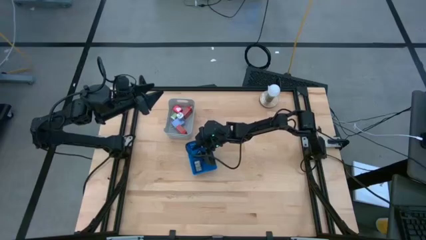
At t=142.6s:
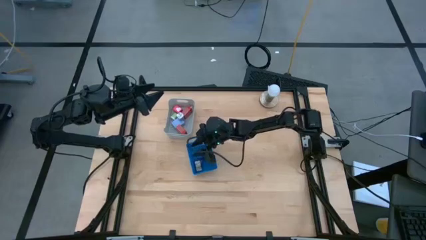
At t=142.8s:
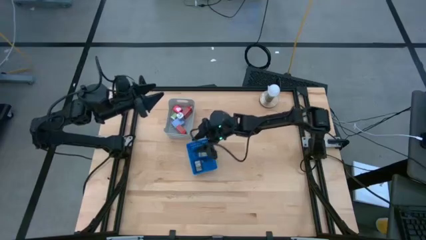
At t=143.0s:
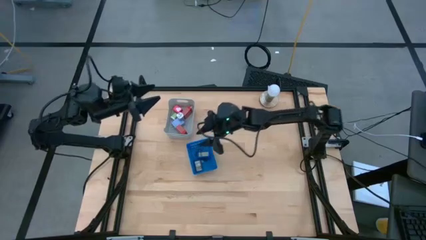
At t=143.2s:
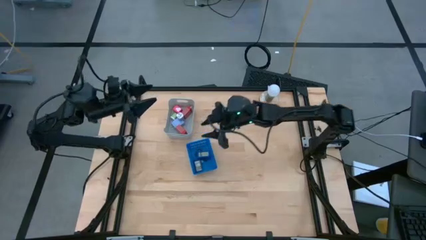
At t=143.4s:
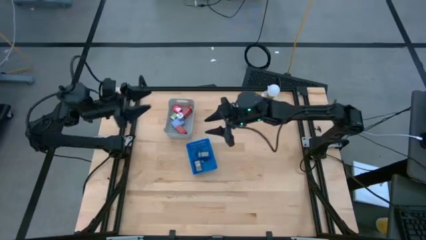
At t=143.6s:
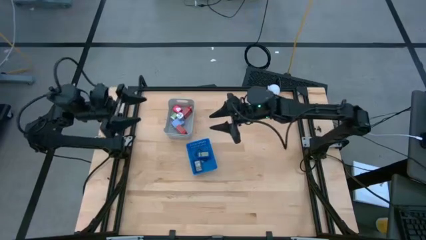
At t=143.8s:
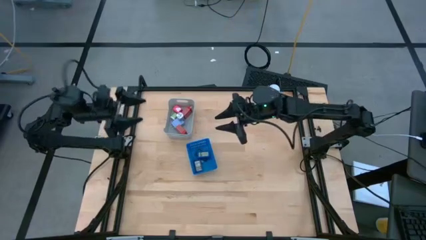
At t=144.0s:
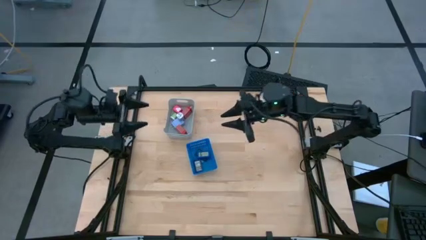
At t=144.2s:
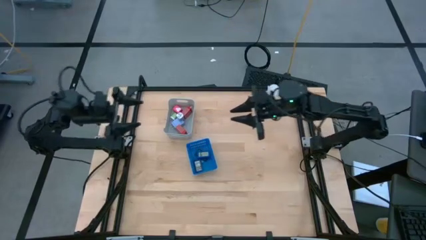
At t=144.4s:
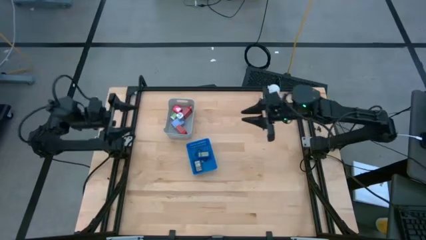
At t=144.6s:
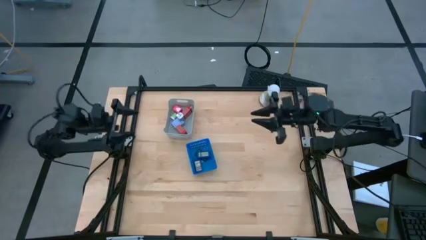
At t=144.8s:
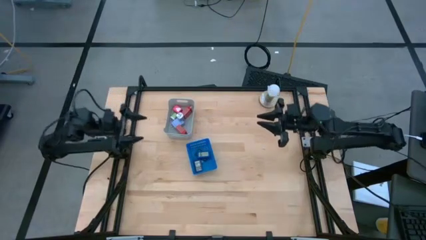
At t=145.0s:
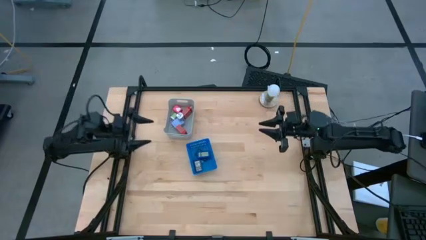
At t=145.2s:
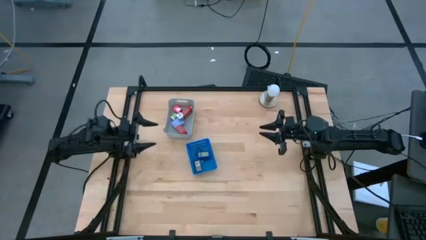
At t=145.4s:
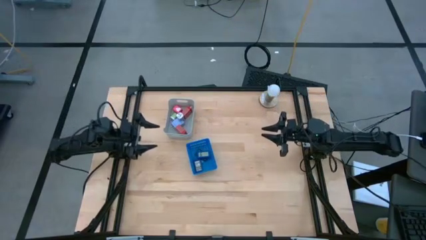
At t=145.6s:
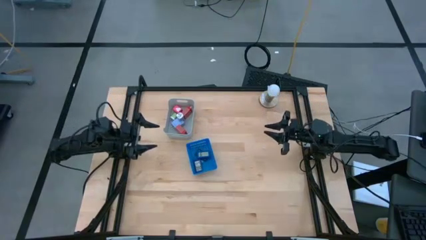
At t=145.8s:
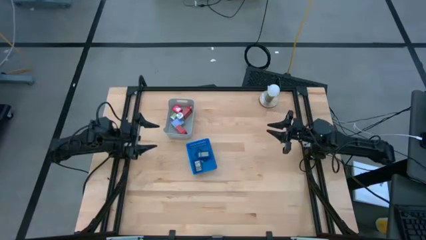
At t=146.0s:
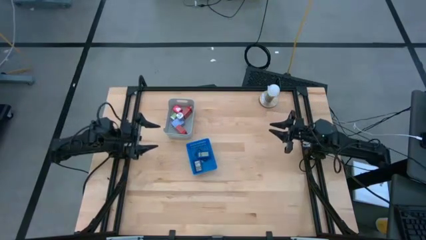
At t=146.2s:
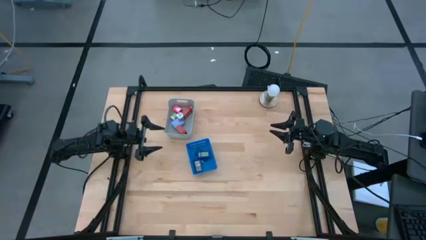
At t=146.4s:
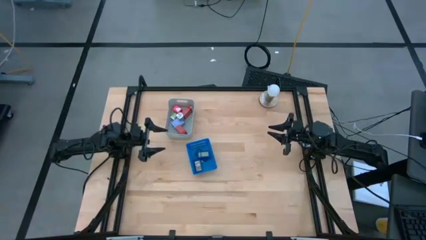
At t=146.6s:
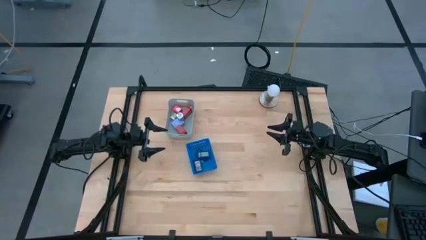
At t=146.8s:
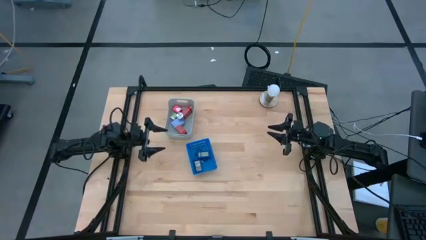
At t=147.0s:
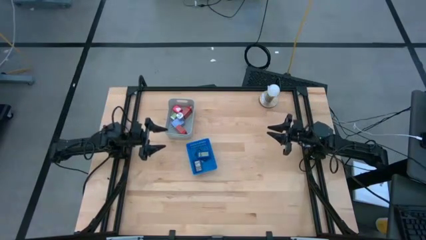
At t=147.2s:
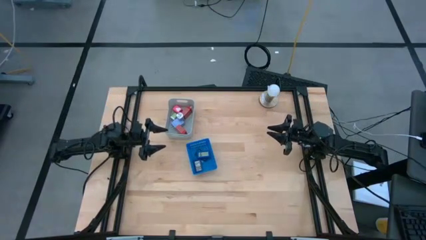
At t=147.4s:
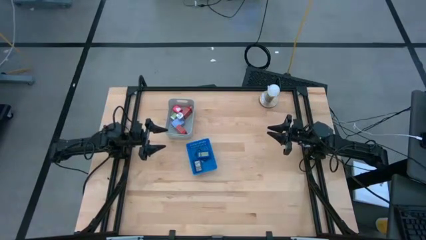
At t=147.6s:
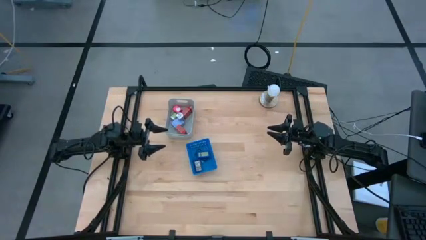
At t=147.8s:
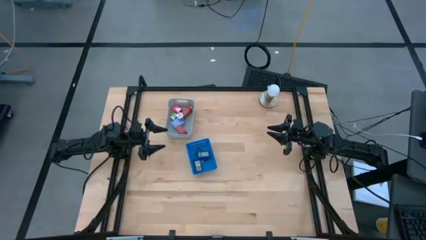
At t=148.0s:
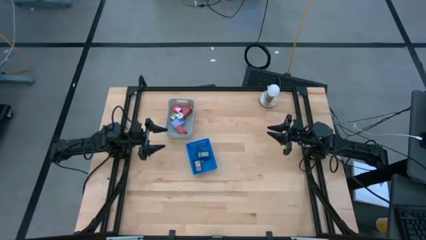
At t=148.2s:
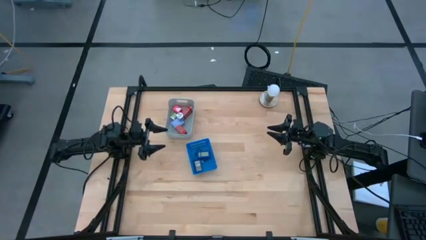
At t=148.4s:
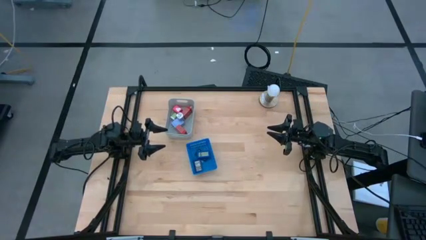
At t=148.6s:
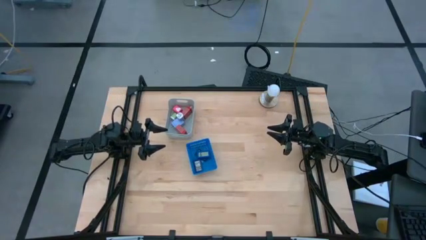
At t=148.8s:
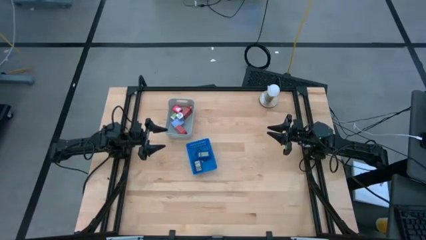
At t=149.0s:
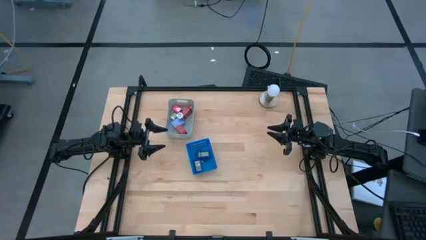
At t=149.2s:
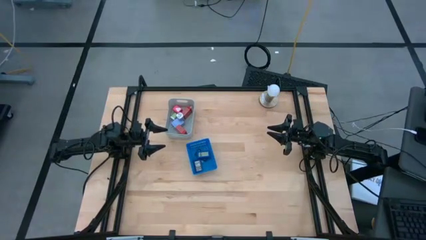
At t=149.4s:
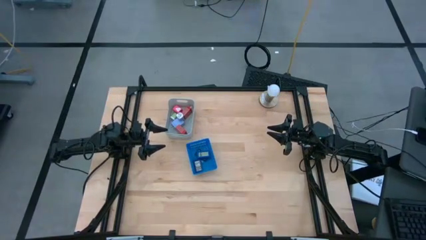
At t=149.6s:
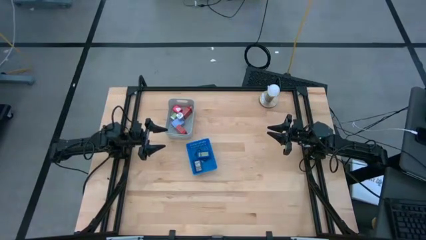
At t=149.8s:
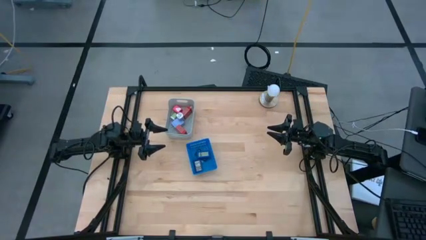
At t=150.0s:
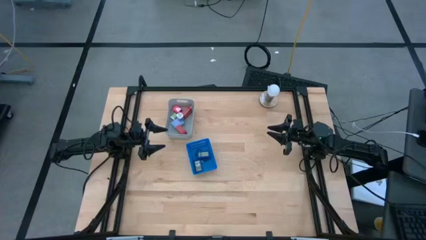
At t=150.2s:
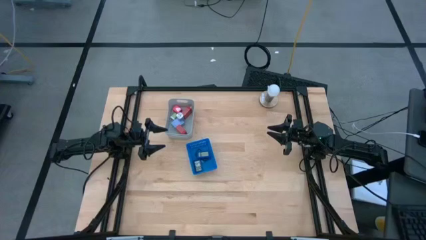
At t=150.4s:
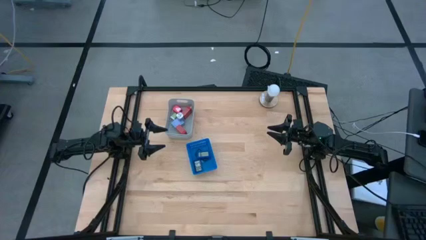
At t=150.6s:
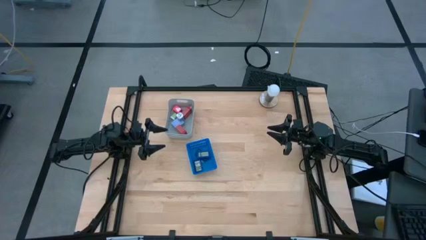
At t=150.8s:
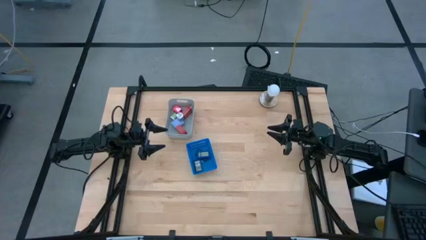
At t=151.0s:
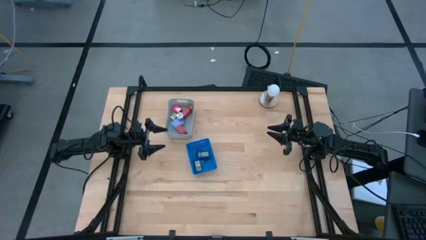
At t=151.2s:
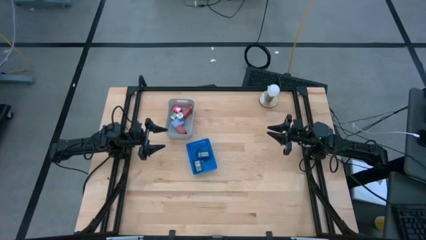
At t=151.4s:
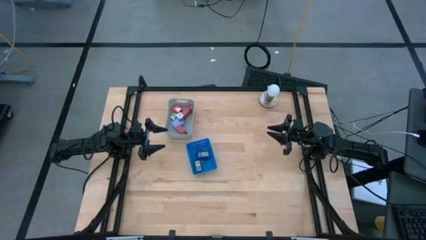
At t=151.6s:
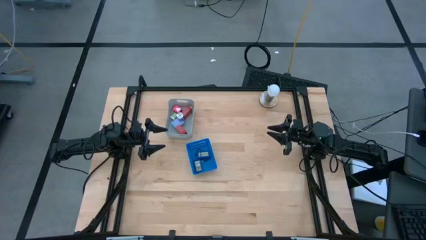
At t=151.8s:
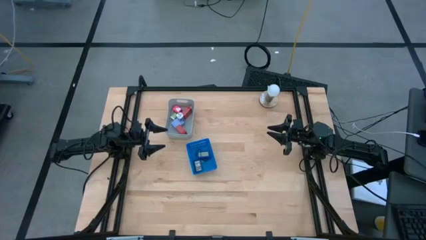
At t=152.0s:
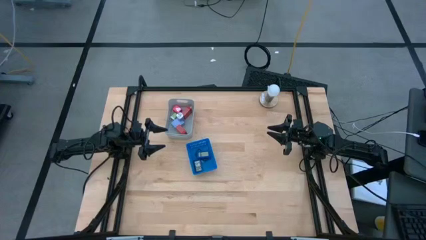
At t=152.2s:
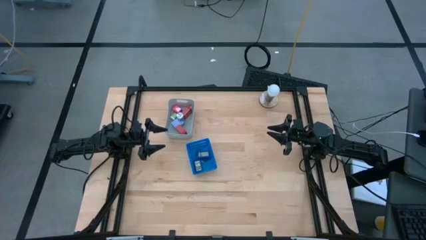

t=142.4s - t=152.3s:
Task: Pick & Place Office items
Return to Home Position

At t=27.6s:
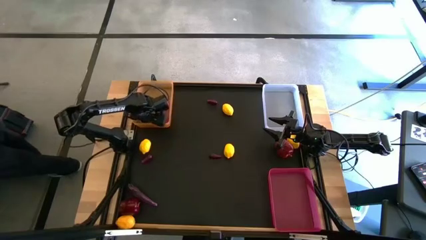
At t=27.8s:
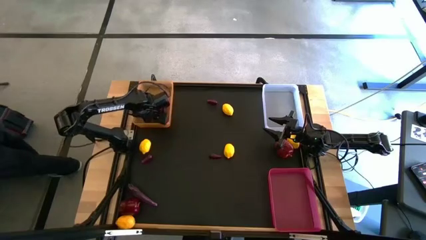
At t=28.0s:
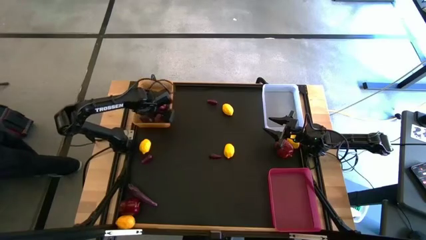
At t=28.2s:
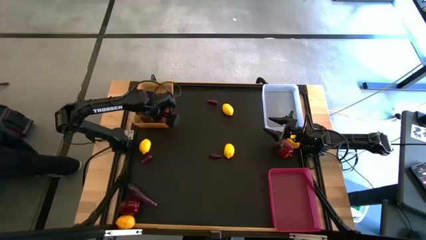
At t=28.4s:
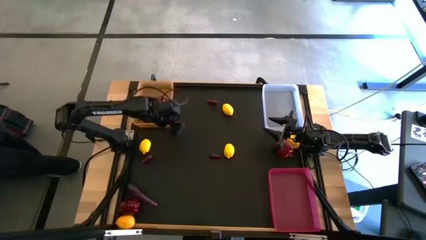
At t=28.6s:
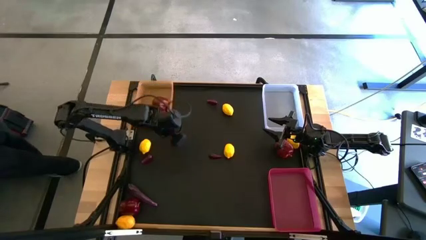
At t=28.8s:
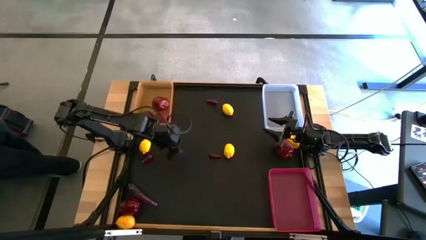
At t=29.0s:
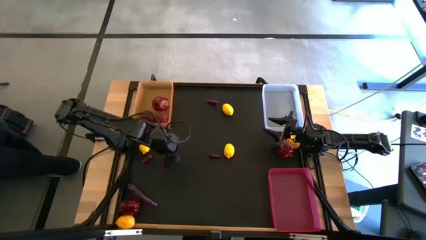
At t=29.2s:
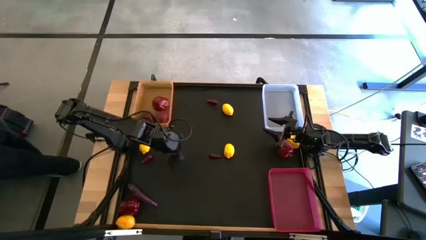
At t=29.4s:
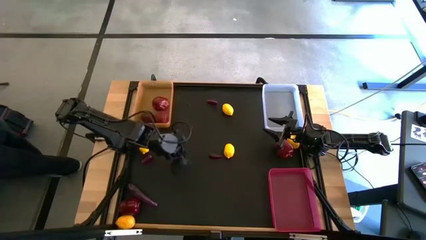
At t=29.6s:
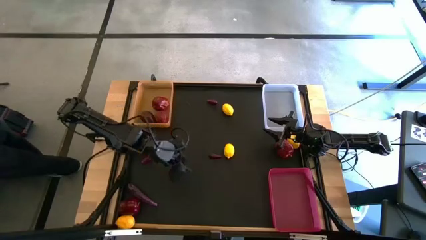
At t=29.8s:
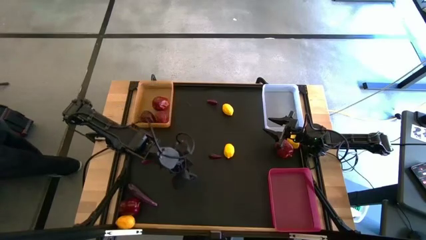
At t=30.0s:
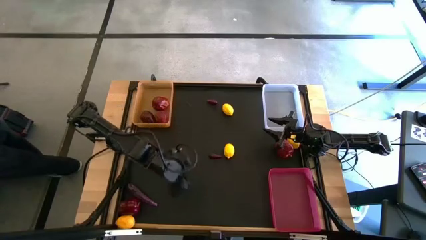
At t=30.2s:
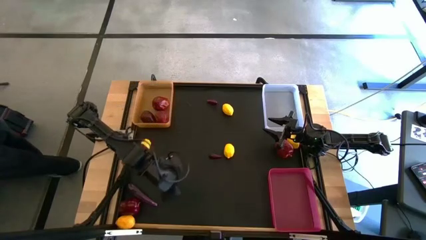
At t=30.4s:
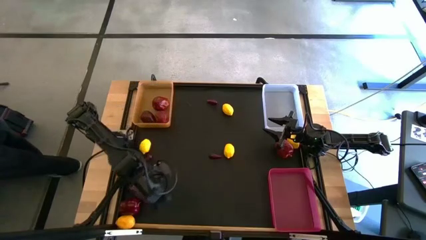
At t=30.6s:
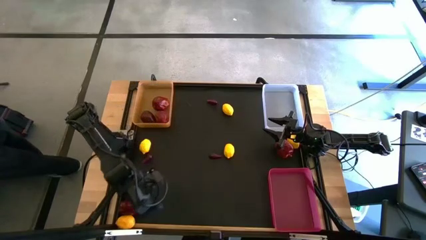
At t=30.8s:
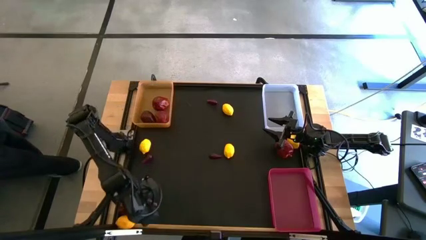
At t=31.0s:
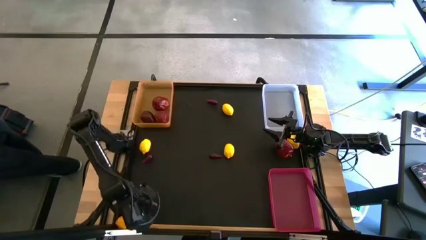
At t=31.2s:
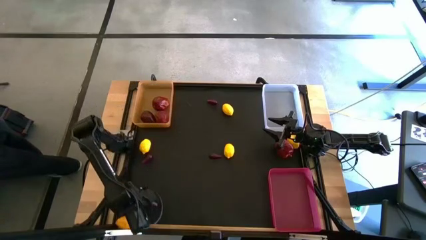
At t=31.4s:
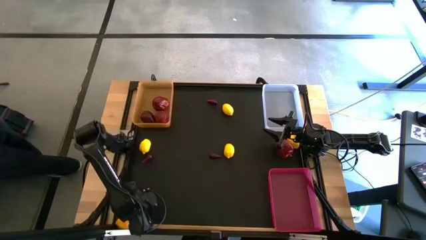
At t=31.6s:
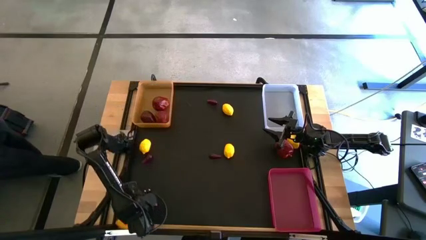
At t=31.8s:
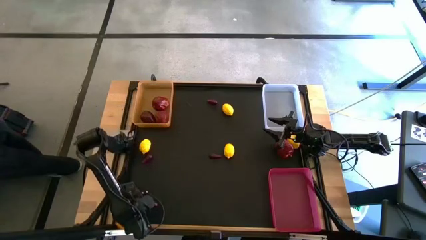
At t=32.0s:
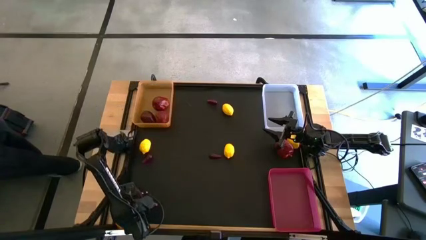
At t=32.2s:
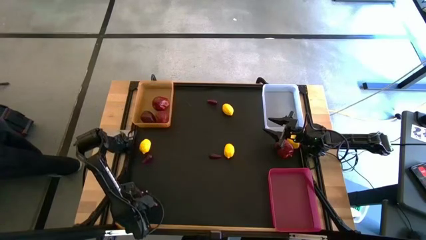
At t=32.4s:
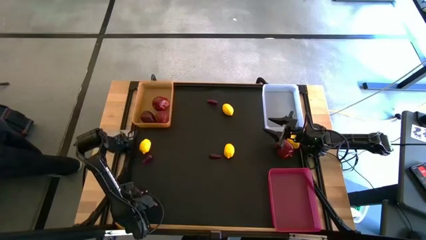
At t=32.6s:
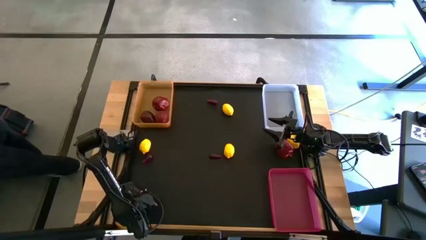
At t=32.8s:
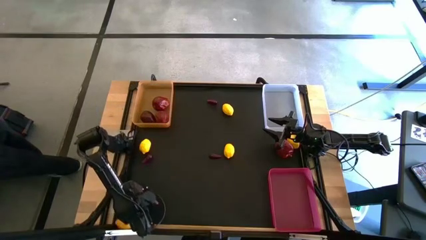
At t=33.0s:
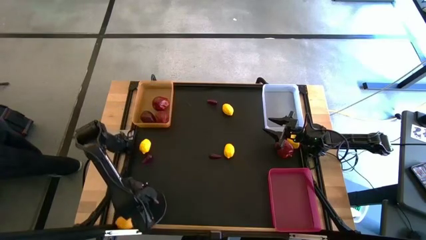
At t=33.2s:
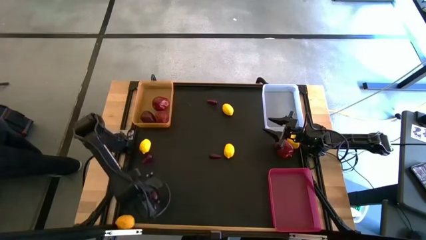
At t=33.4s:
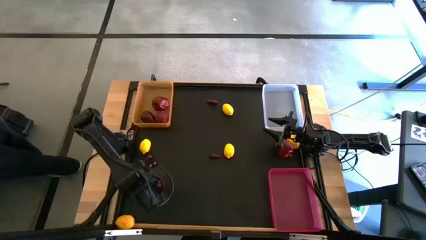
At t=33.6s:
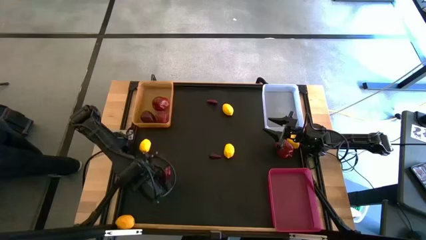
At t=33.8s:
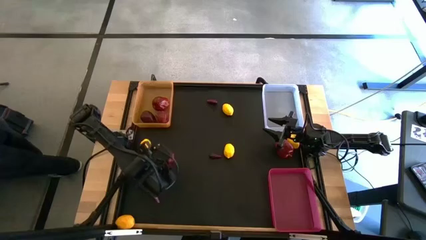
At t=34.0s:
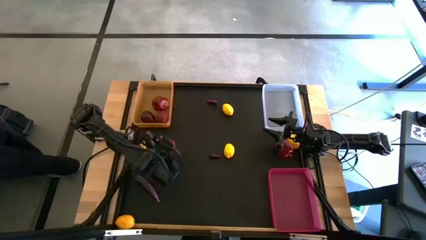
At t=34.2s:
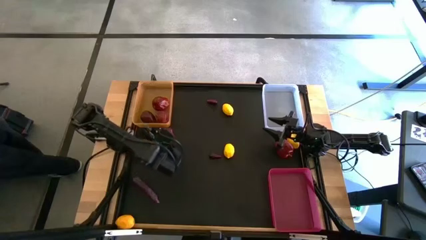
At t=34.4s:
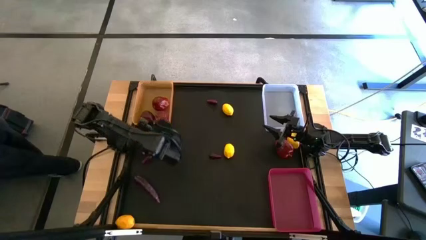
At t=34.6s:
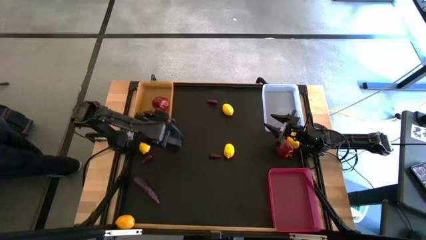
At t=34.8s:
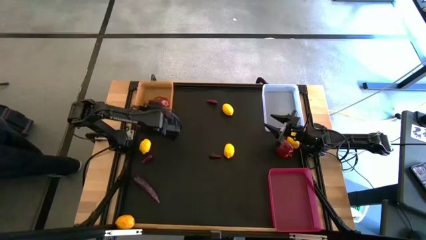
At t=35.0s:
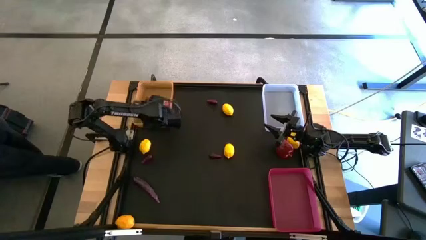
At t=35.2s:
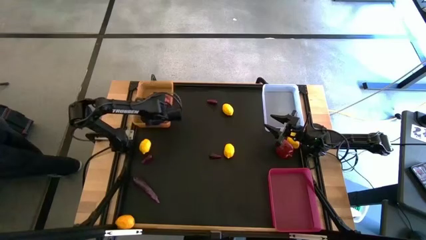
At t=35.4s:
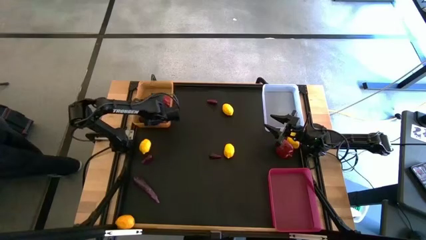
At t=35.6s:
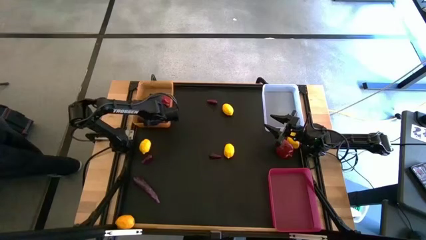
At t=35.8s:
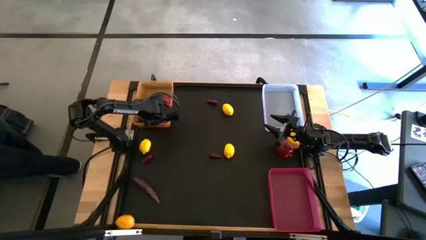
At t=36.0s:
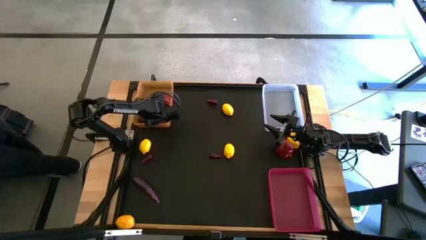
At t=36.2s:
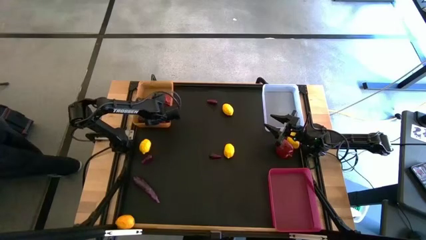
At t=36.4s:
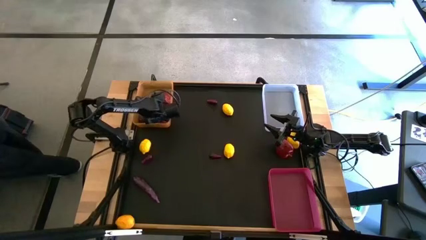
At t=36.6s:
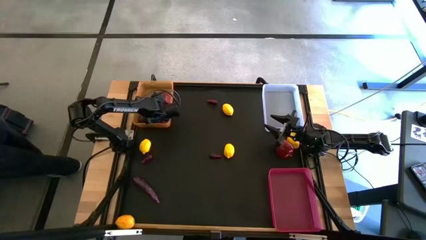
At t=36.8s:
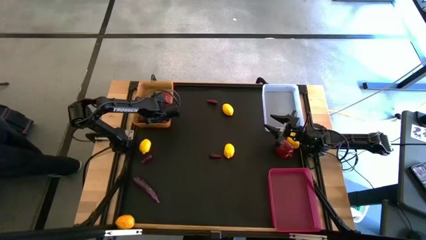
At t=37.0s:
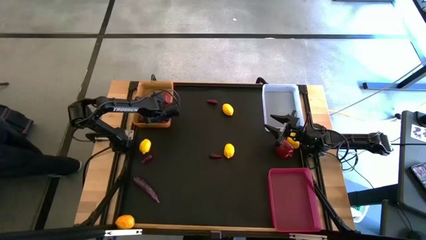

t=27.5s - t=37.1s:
Task: Sort produce into baskets
Put the apple into the orange bin
